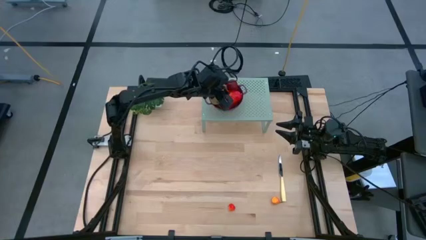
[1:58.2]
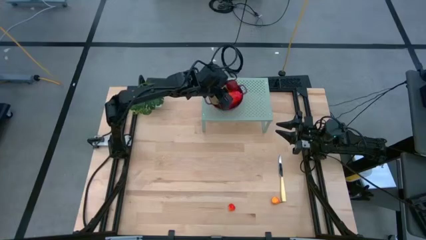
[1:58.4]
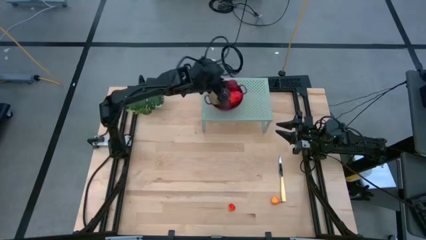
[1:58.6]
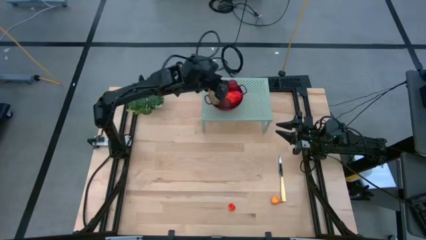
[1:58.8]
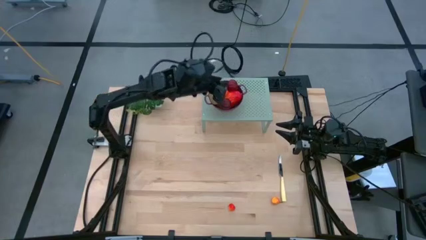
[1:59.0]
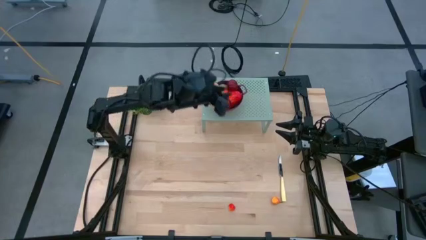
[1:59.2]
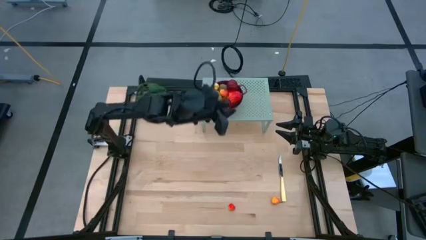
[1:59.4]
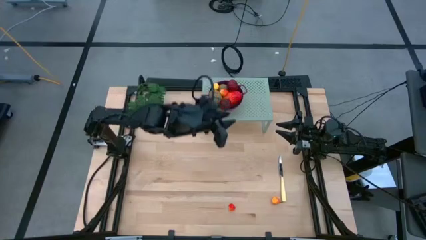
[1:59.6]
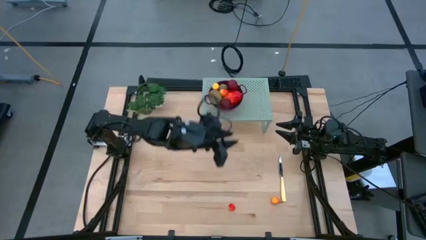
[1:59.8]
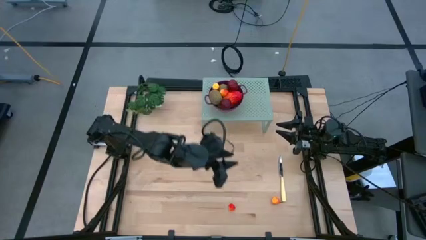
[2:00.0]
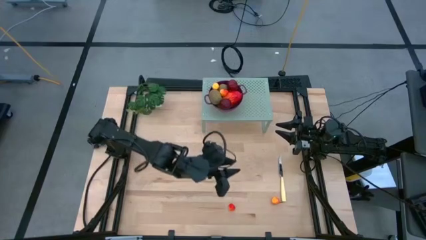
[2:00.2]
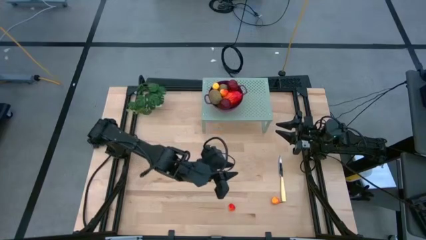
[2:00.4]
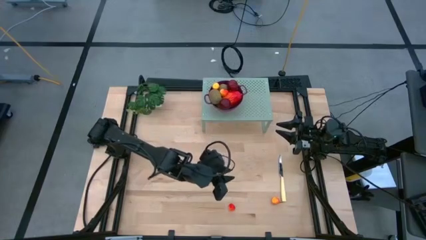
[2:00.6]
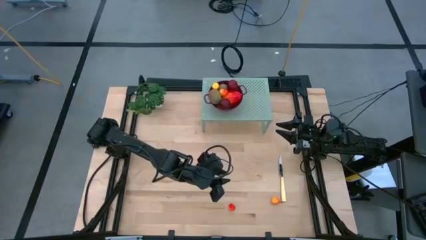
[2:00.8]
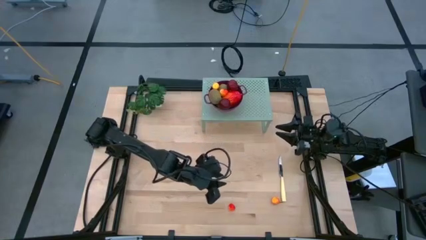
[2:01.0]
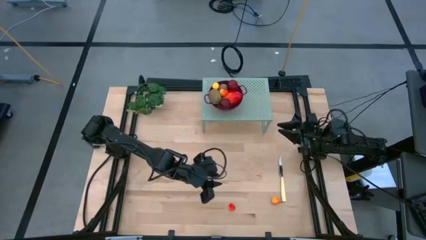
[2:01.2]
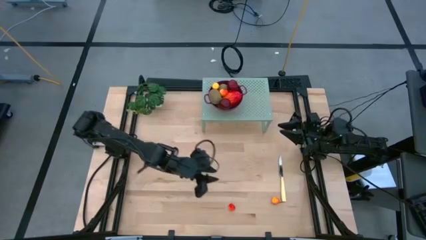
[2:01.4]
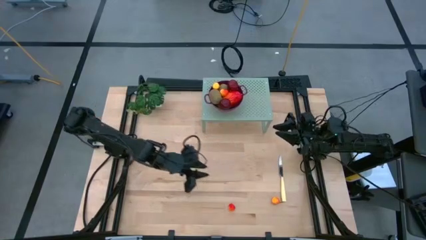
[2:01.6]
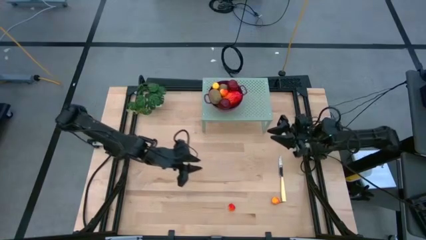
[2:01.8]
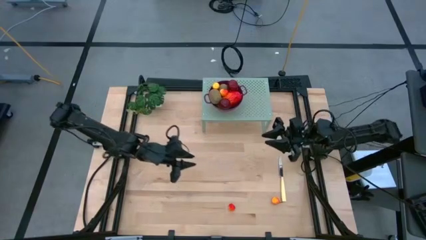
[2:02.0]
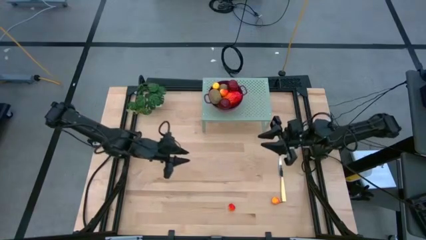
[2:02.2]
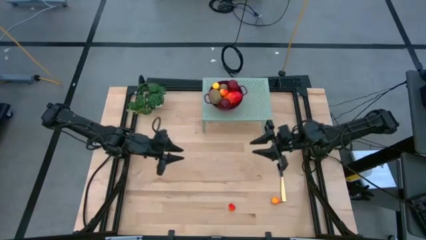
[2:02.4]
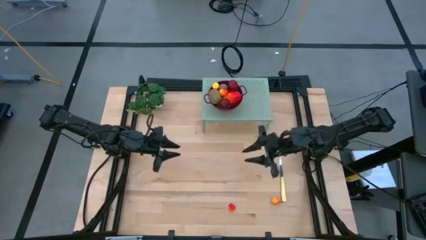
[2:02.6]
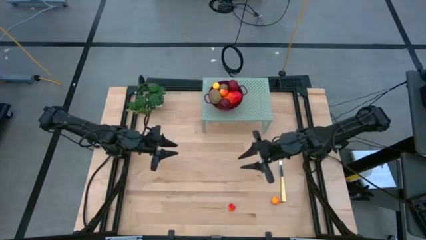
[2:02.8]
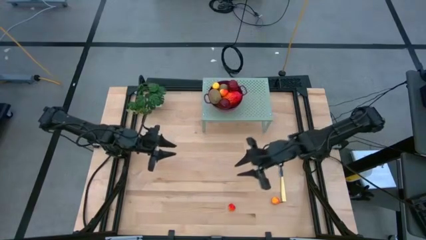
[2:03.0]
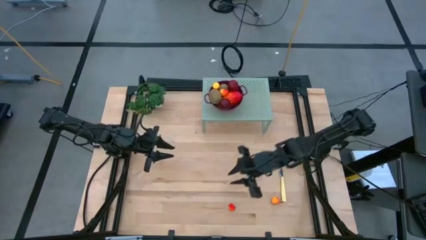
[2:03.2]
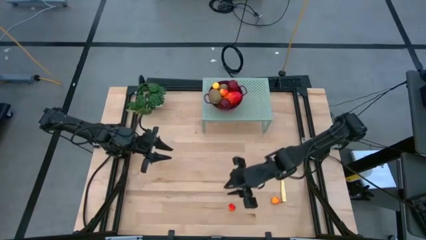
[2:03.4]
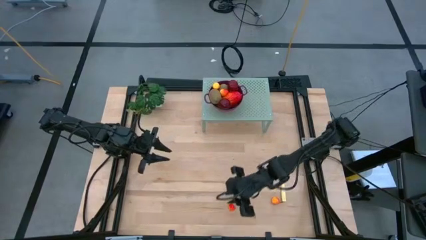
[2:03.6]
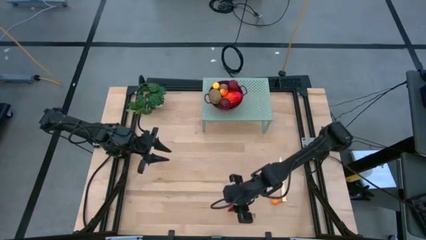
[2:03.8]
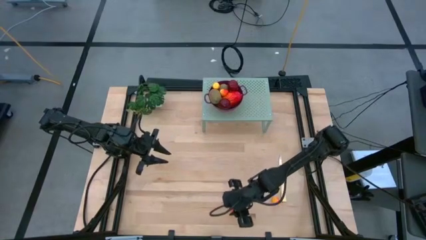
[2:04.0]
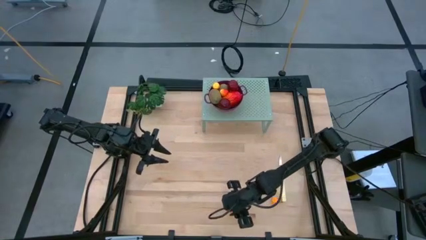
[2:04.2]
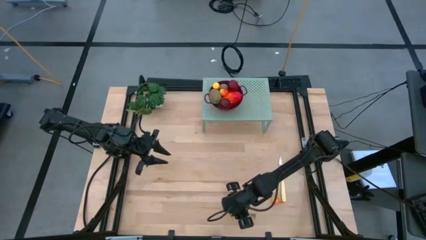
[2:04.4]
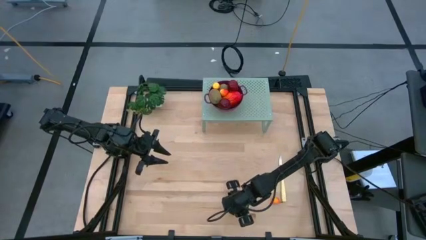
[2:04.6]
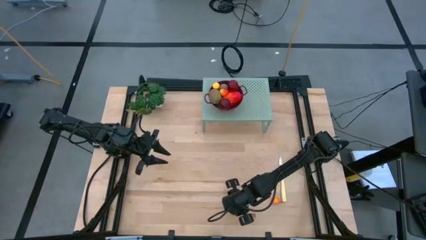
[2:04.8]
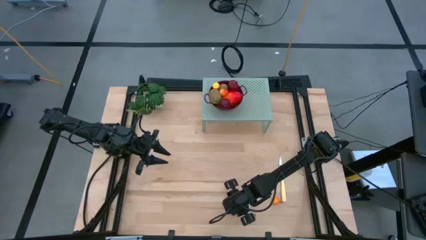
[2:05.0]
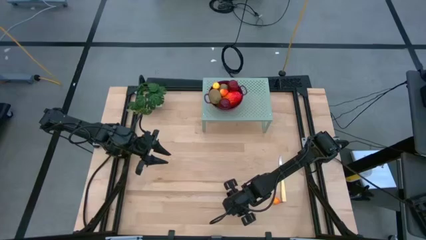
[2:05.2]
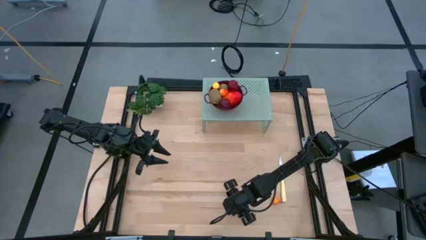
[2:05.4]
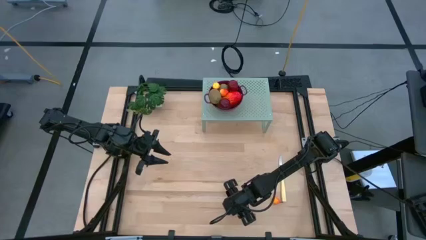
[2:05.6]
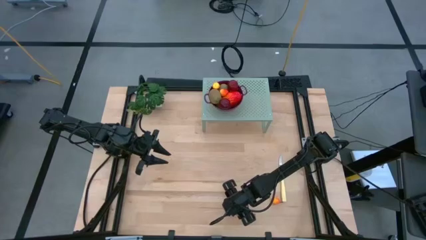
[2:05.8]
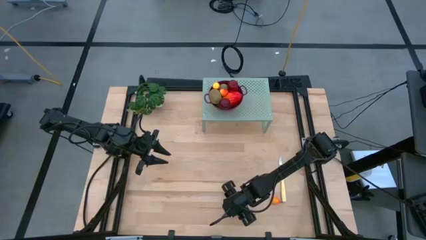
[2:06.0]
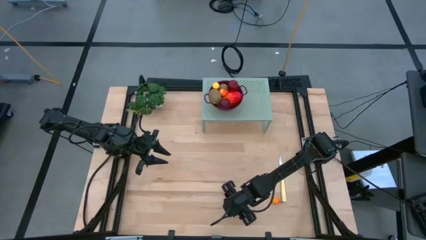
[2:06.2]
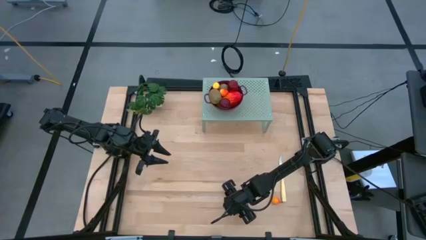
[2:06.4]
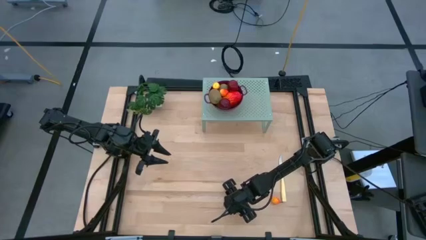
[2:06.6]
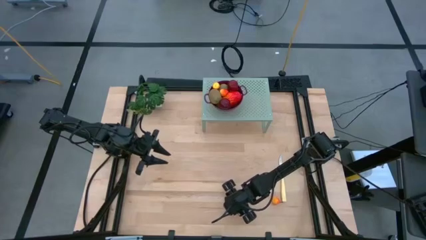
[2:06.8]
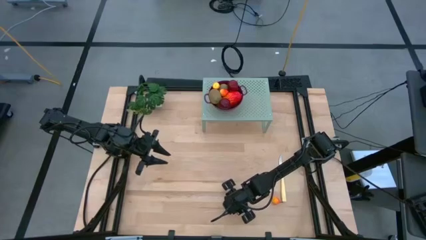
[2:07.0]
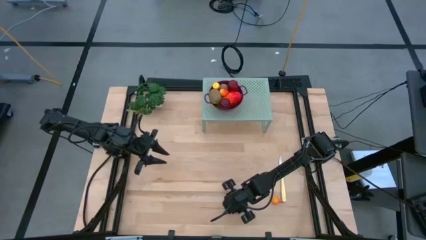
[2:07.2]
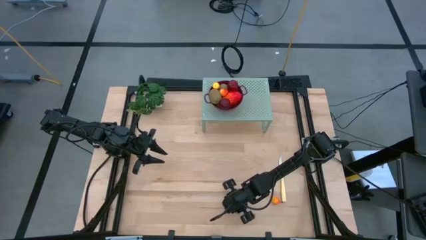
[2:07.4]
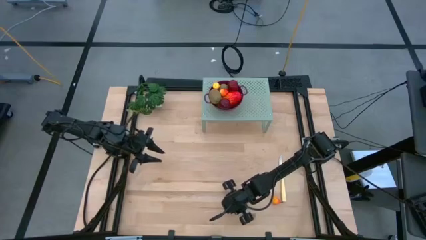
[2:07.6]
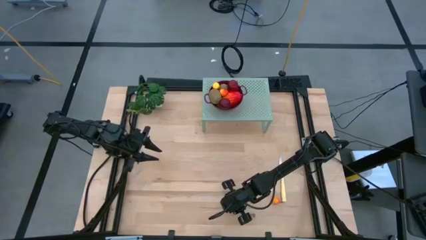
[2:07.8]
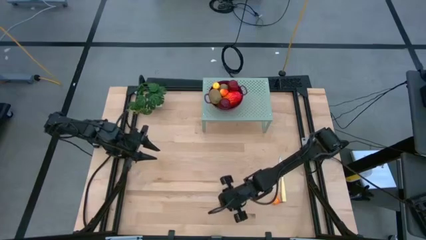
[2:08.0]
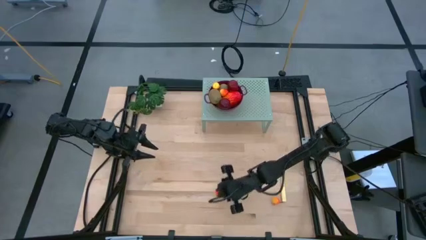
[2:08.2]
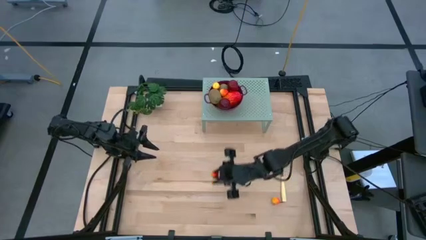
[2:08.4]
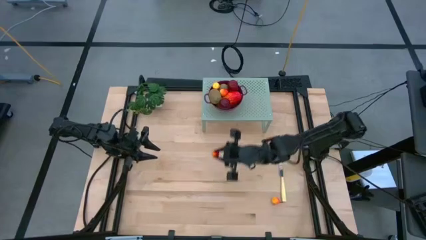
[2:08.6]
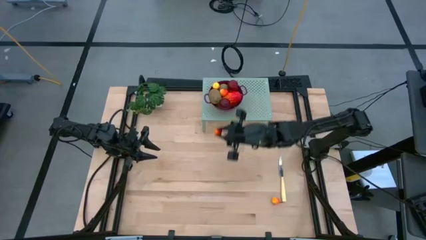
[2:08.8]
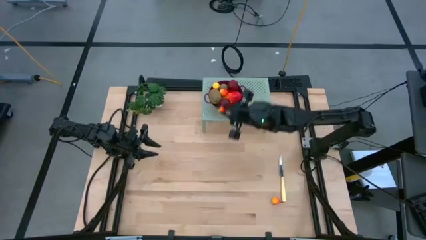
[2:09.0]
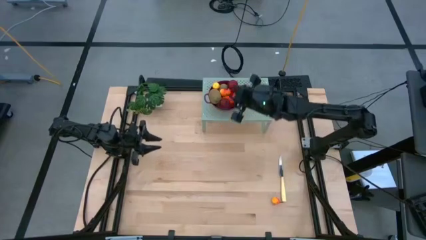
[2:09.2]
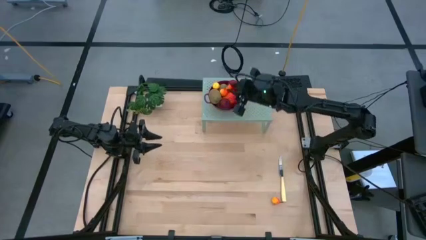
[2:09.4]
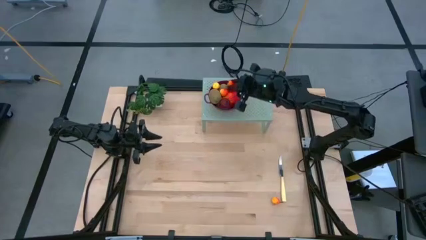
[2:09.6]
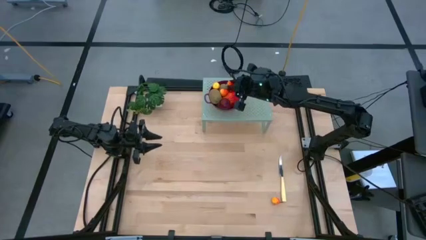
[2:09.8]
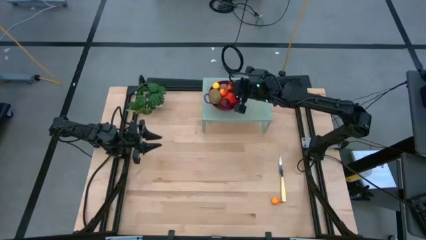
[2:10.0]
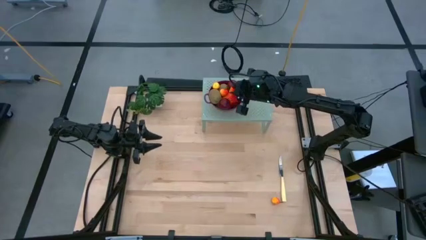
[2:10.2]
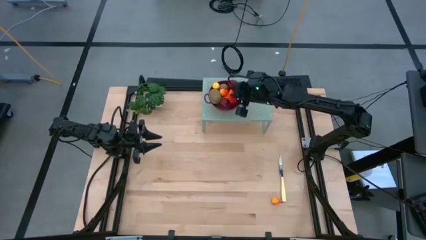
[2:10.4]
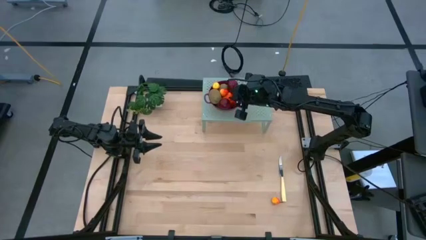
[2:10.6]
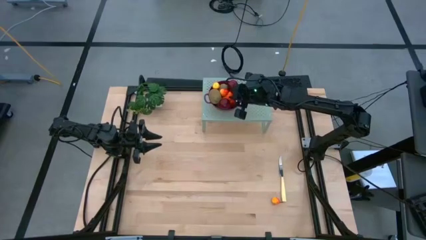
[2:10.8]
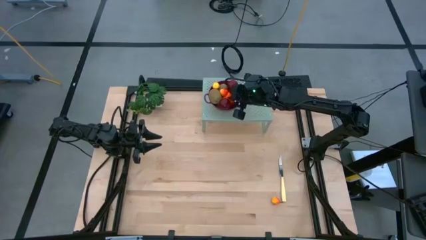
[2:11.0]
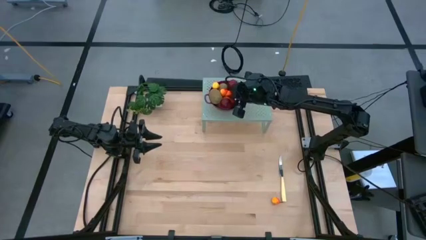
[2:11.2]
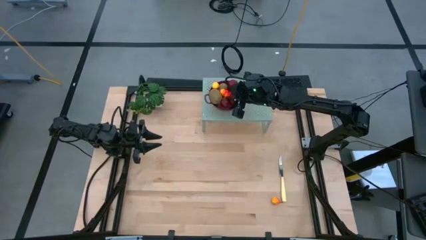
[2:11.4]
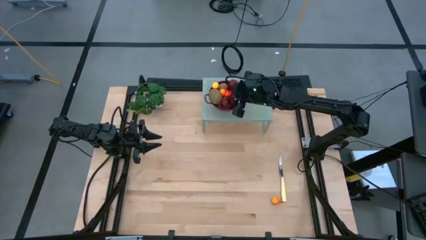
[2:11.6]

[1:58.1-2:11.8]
Task: Pick & Place Fruit
Put the pear in the violet strainer bowl on the shelf

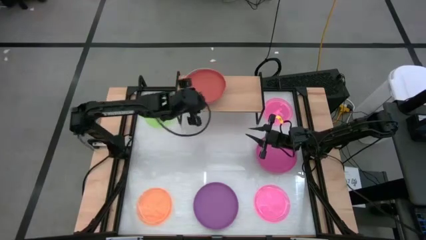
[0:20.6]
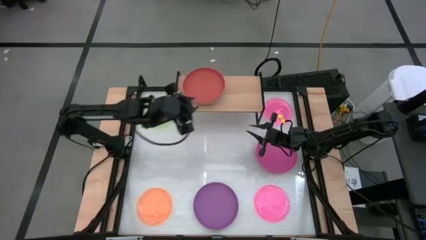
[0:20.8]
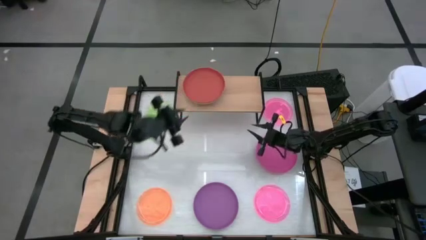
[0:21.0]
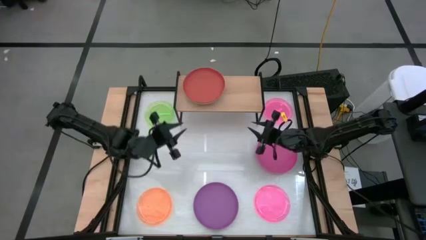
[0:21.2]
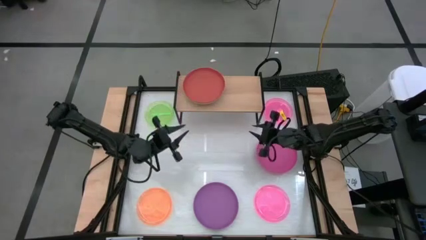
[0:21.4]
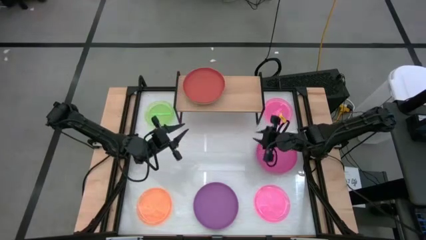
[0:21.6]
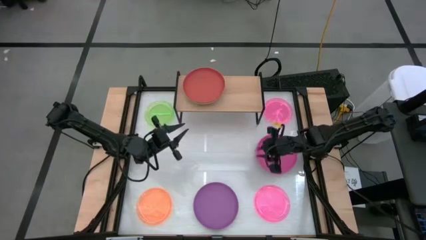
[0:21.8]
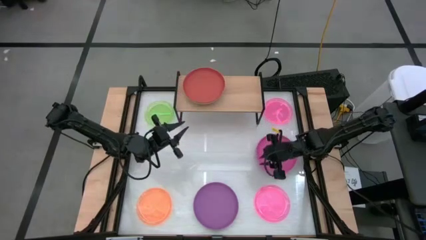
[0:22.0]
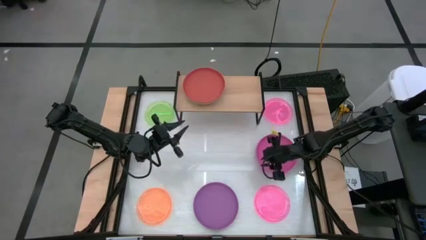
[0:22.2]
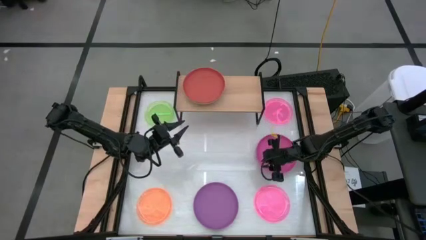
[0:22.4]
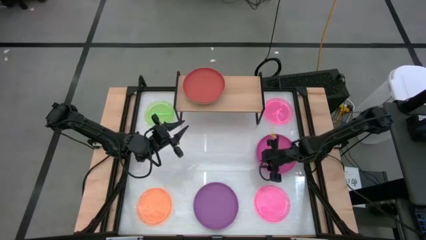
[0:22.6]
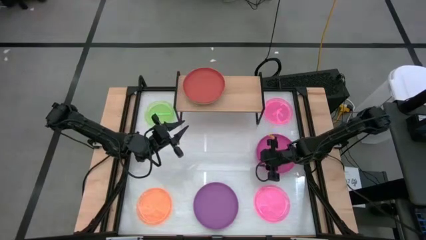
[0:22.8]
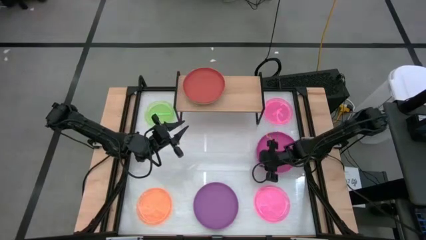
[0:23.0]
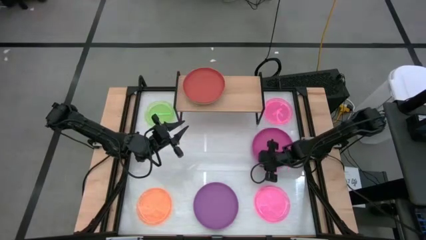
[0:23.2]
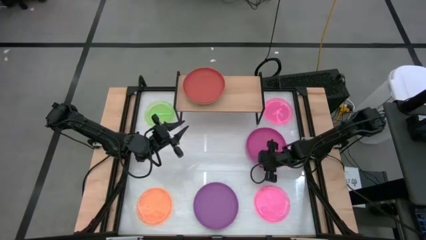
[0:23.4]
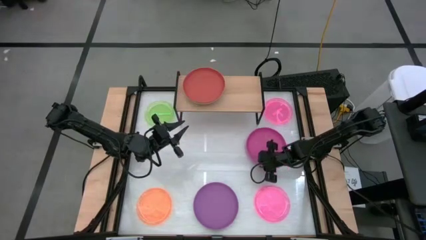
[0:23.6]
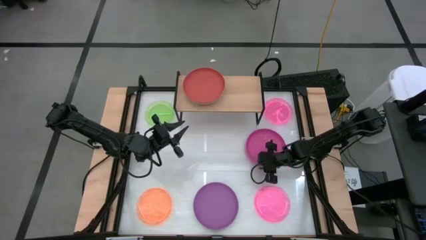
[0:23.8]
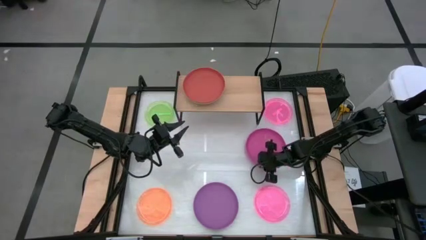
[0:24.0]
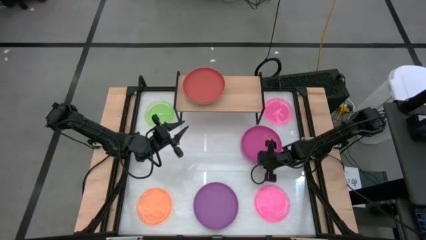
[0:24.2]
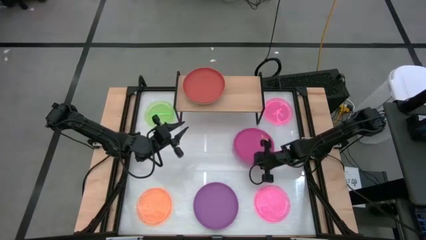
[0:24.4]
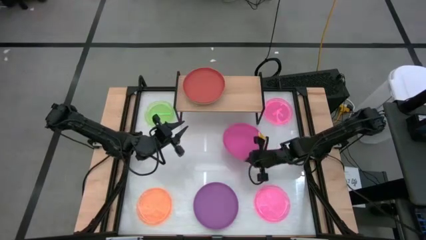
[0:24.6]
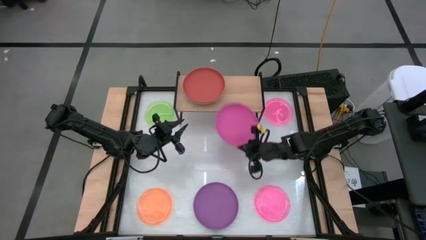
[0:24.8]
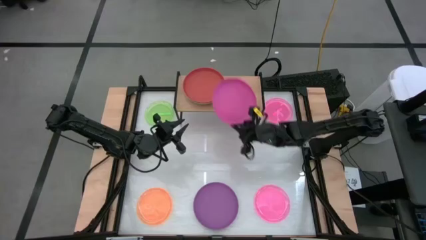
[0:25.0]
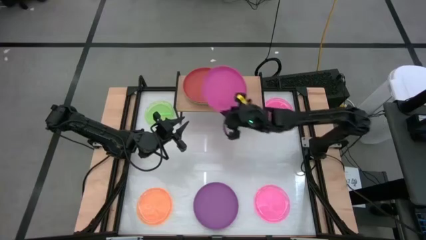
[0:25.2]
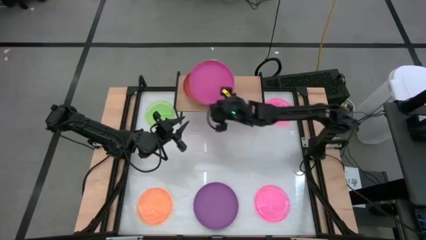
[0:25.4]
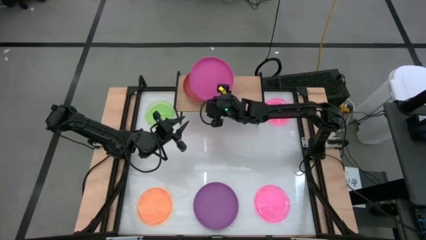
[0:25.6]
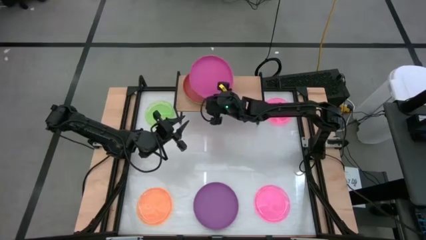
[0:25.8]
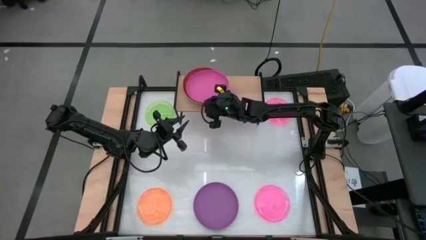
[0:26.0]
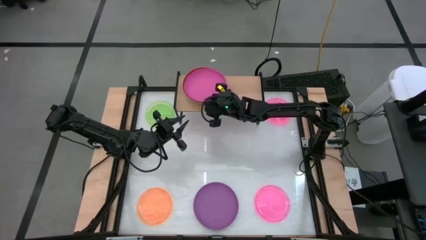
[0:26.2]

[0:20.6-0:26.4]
Task: Place and stack plates onto a shelf
Stack the pink plate on top of the orange plate on the shelf
